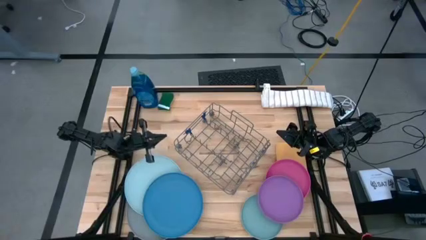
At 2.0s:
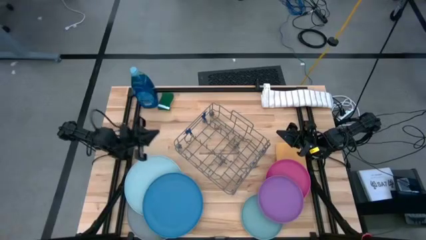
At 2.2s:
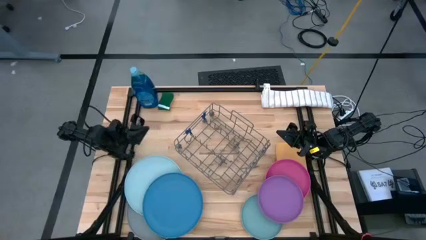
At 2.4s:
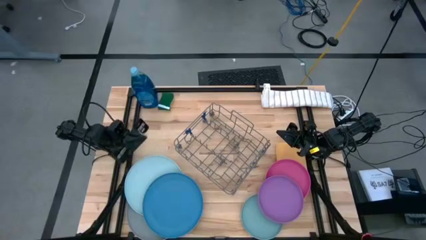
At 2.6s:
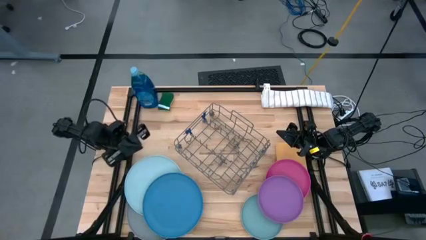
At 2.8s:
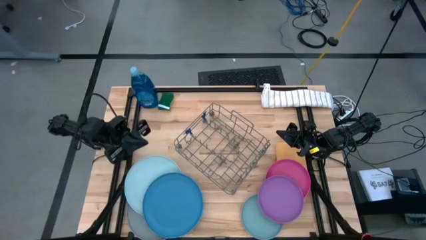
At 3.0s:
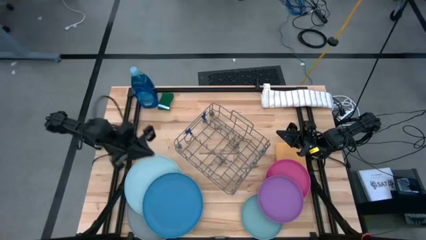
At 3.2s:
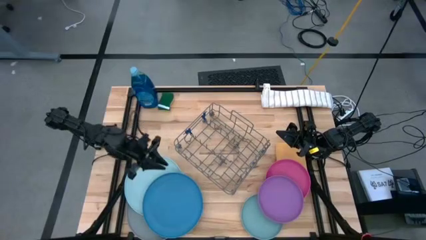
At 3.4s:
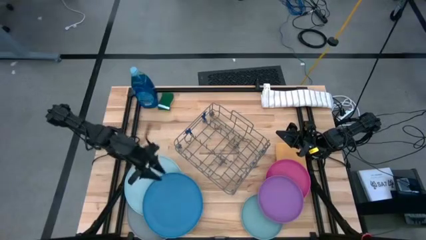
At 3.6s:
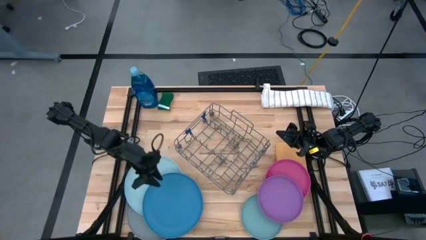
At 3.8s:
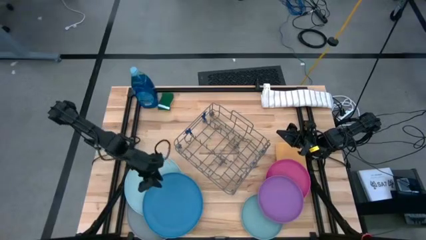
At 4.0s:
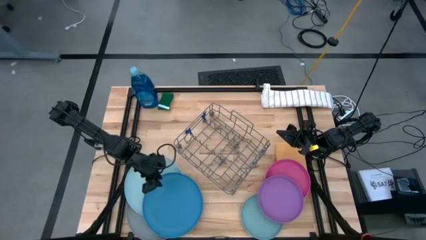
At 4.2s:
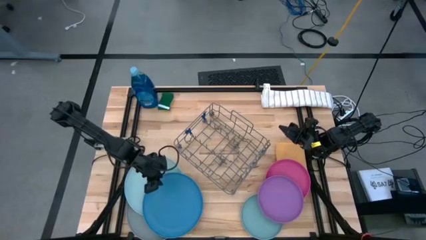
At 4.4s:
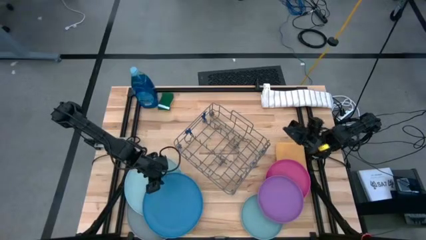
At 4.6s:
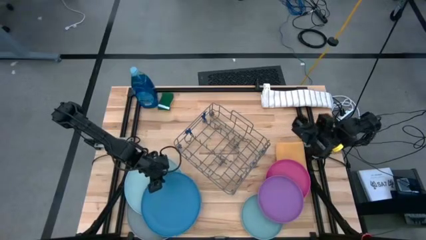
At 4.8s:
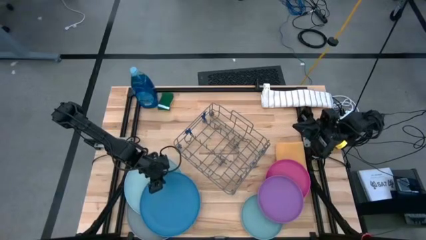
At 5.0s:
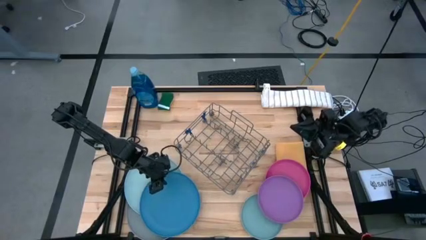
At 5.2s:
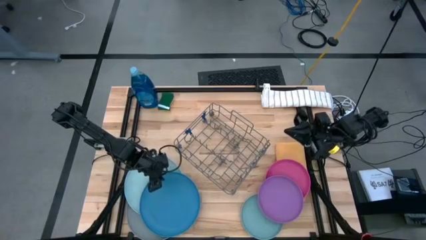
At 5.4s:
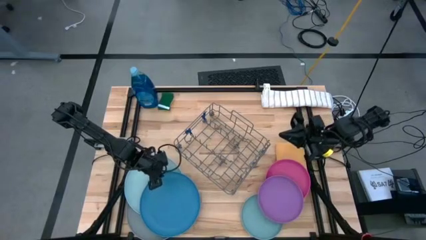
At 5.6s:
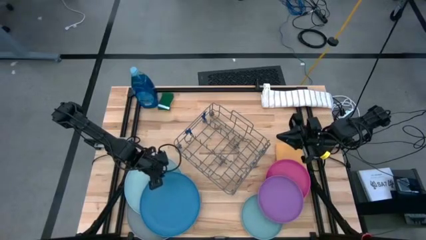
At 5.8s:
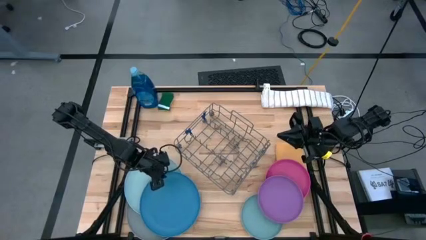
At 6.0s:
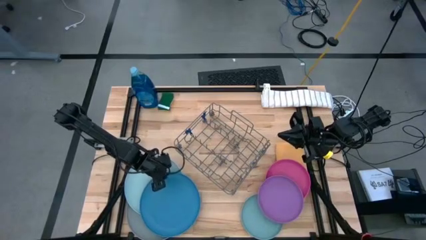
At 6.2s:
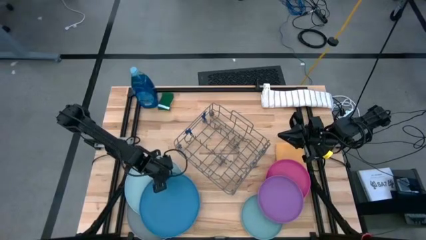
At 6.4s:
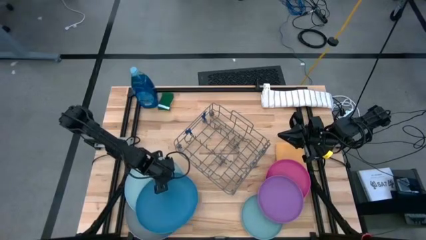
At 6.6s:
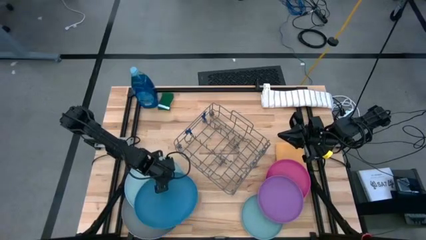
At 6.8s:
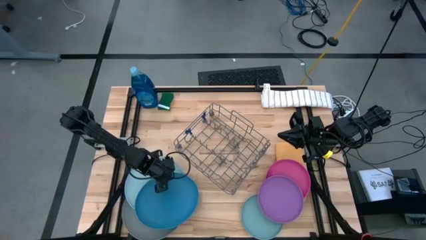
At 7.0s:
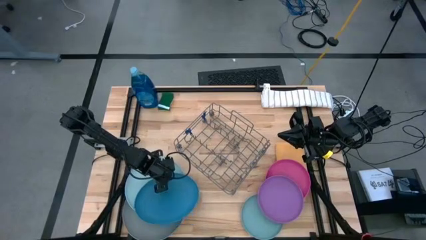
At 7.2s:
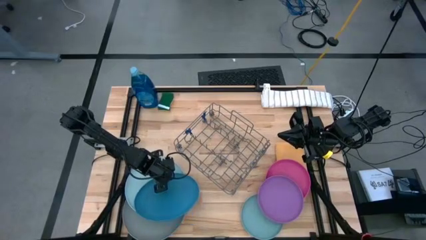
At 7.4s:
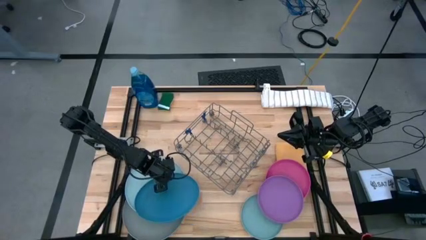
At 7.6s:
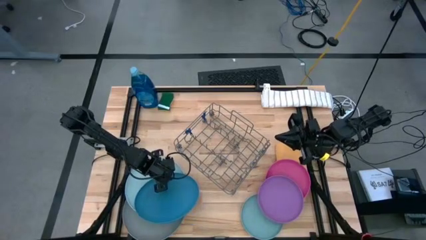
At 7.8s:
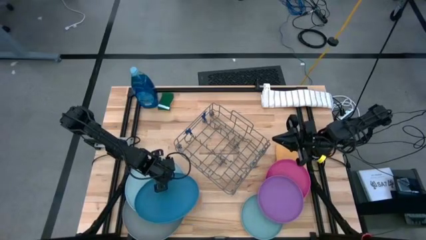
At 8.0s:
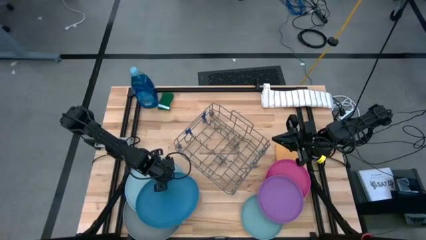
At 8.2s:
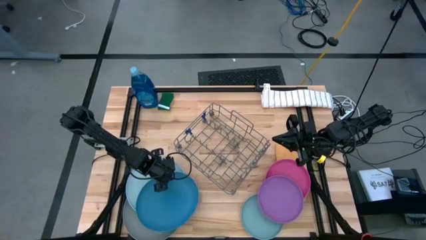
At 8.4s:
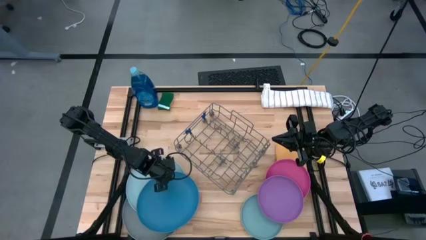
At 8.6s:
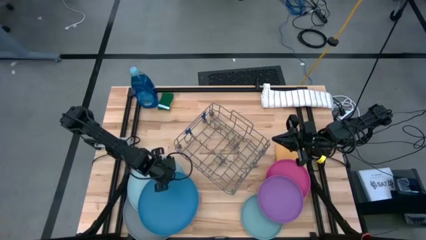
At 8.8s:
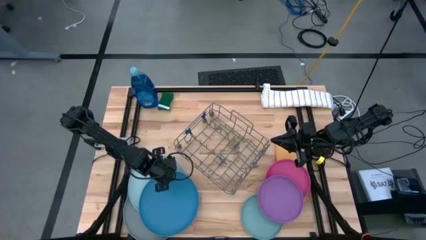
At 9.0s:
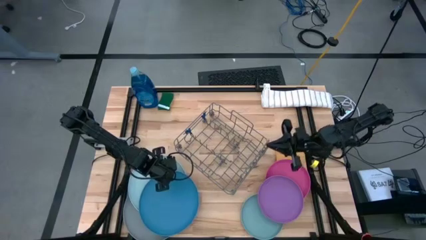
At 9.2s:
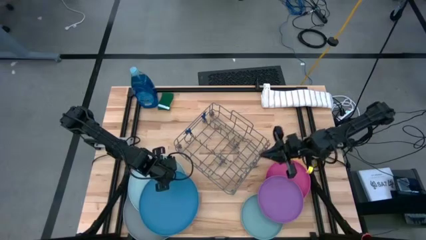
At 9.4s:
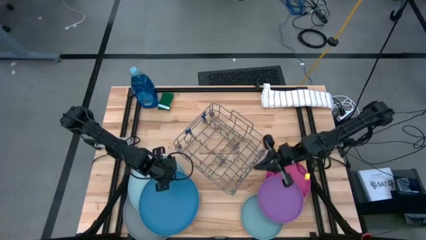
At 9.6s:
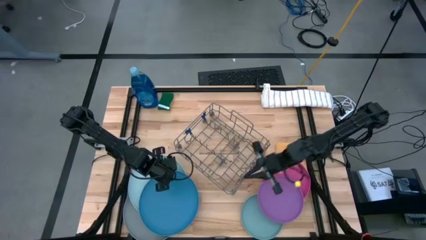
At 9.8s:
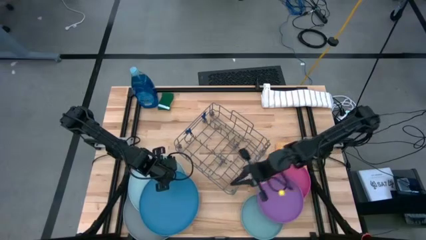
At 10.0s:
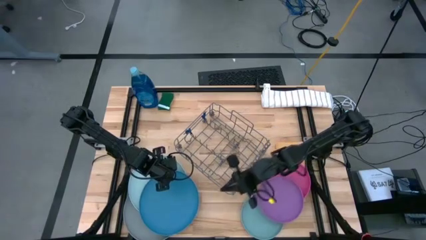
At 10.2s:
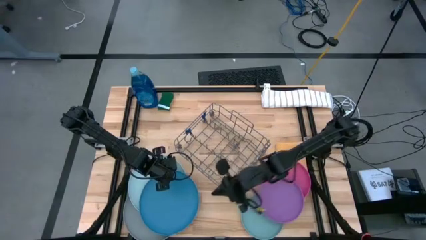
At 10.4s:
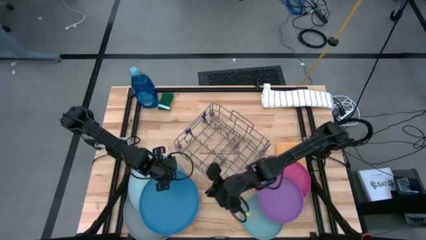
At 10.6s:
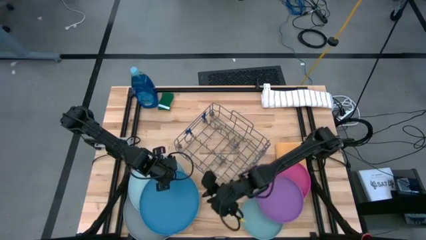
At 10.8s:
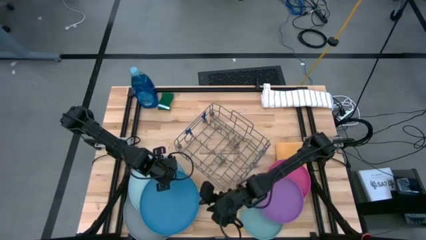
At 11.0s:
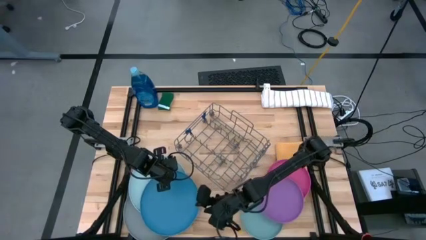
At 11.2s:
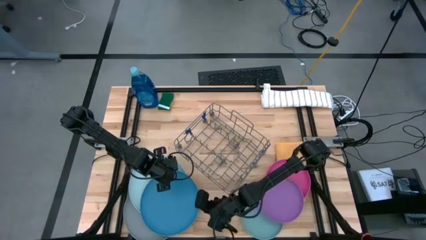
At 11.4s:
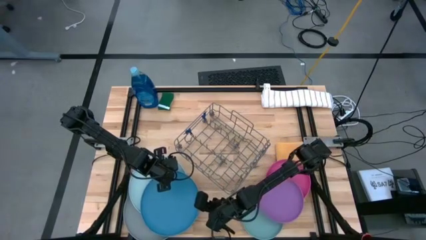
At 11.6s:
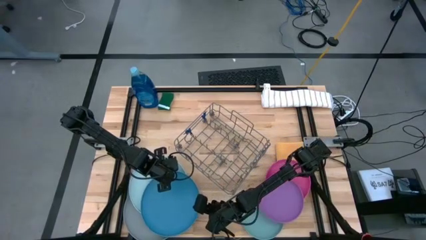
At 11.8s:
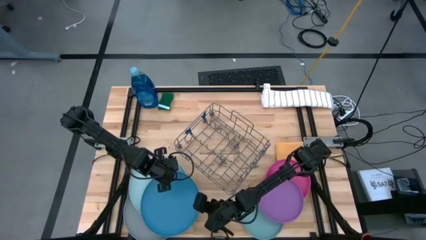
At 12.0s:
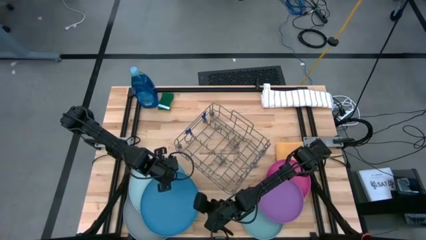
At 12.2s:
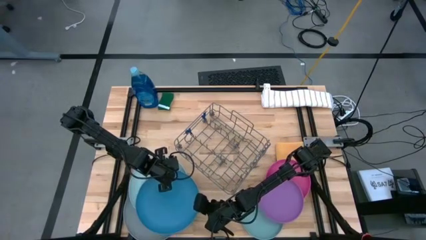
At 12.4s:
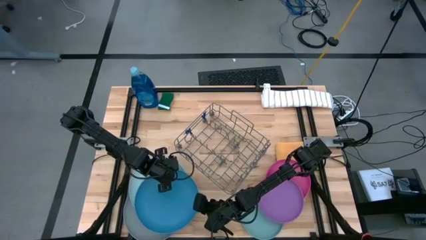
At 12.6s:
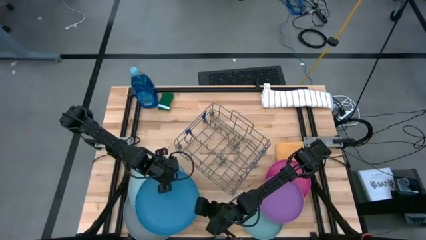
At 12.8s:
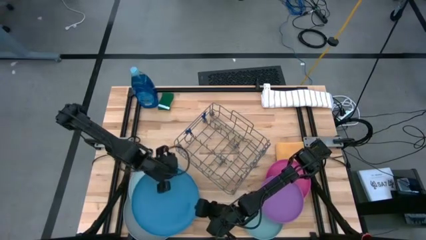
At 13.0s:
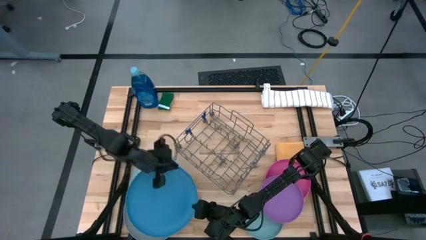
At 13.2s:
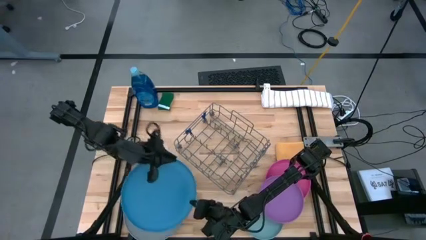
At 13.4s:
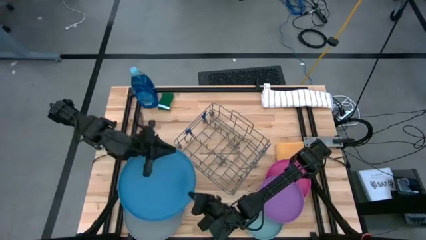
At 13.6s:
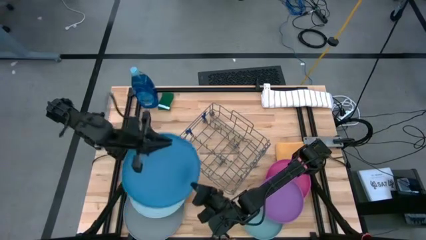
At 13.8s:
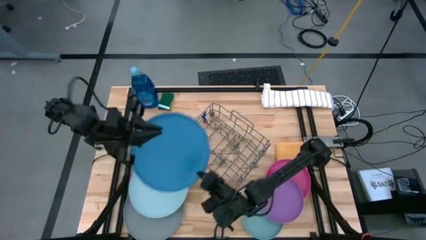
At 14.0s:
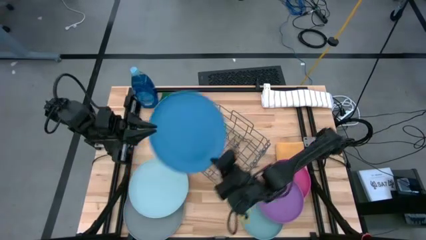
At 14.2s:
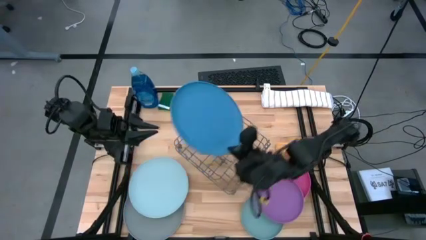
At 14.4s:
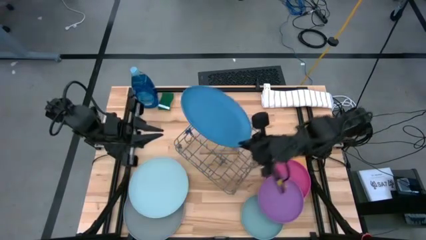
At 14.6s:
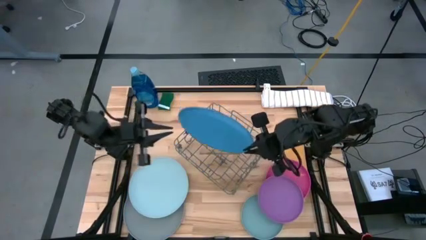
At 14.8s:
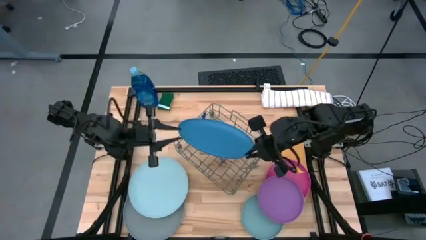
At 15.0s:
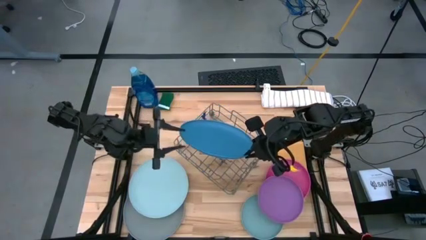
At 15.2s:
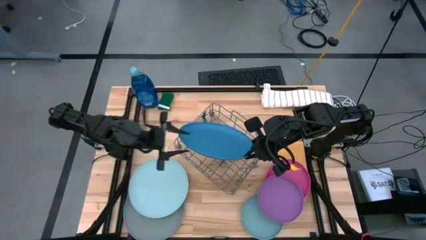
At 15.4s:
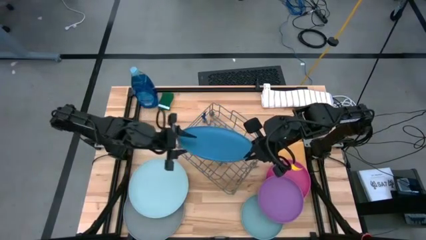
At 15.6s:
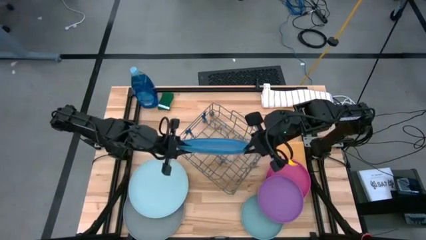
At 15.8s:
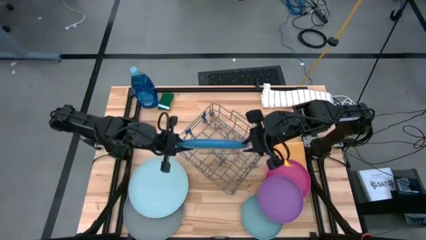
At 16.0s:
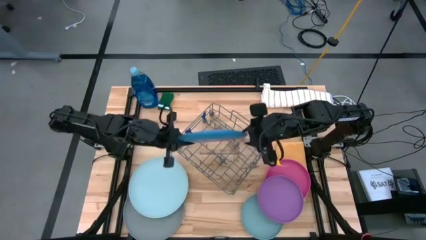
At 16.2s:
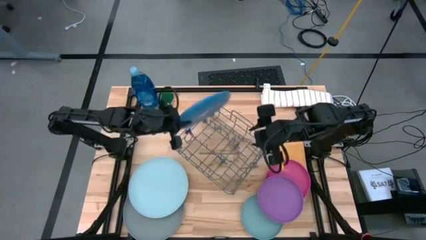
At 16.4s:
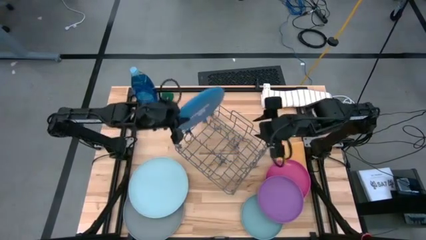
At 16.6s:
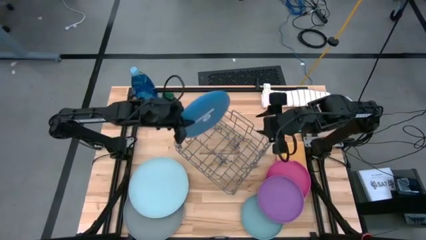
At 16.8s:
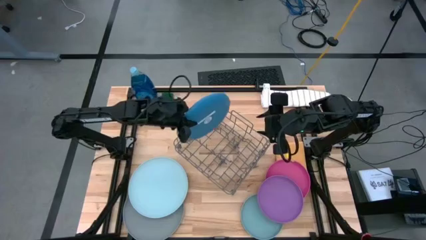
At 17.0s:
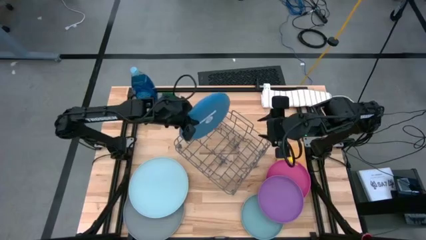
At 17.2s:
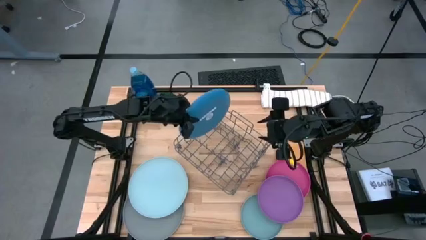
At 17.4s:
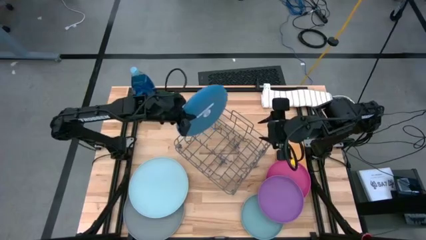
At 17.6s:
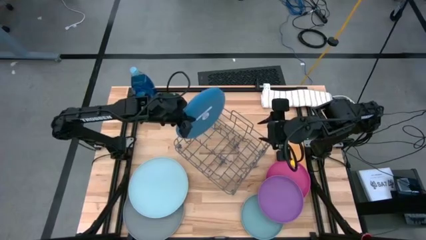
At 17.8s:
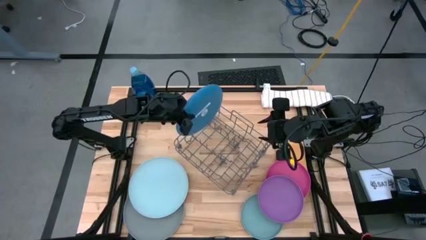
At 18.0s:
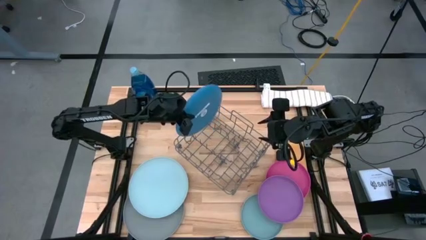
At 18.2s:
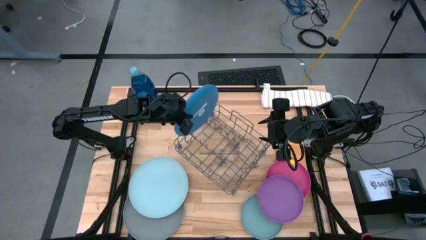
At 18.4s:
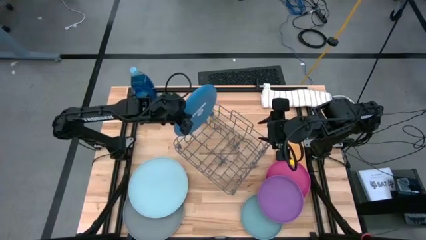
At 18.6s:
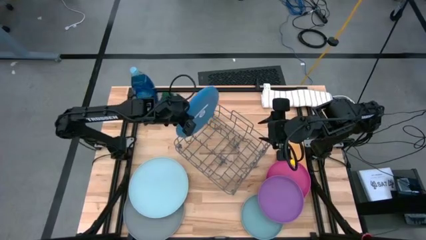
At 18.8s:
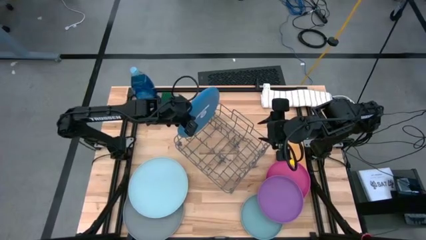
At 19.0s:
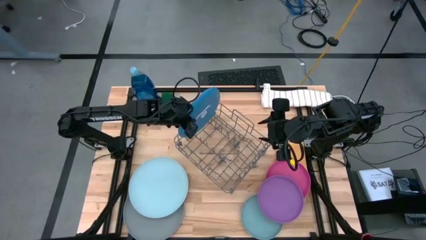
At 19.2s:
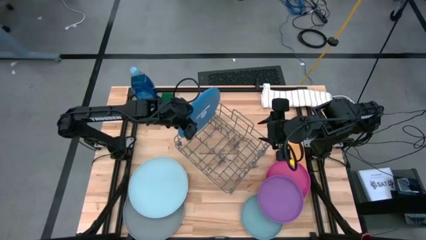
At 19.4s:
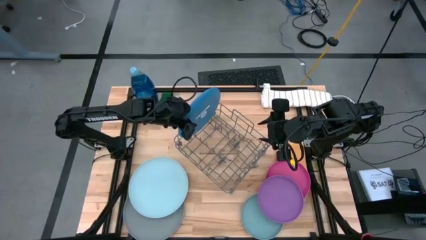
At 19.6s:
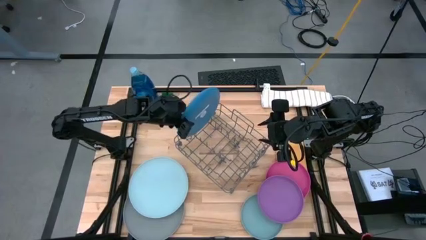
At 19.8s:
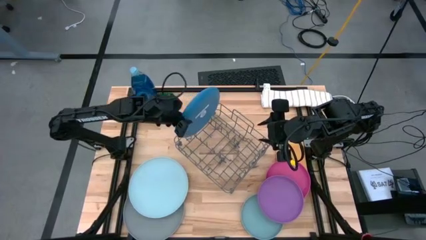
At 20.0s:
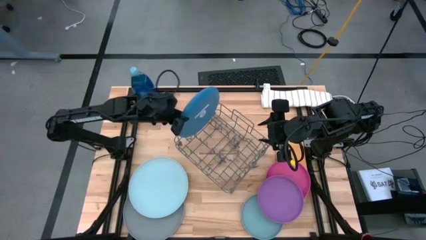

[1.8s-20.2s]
Task: Sort dishes
Put the big blue plate into the dish rack
